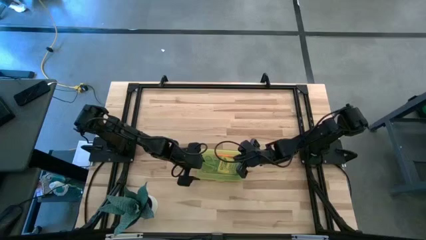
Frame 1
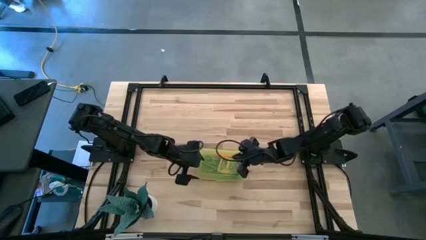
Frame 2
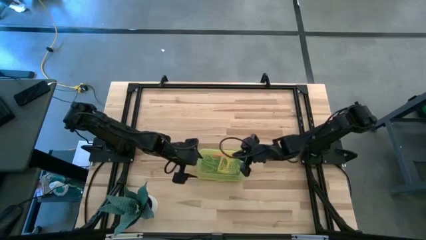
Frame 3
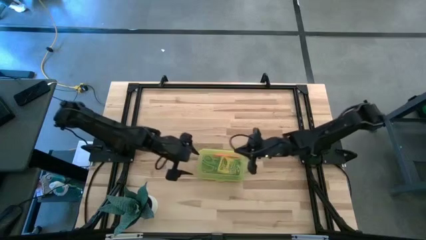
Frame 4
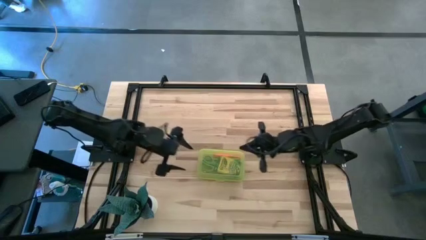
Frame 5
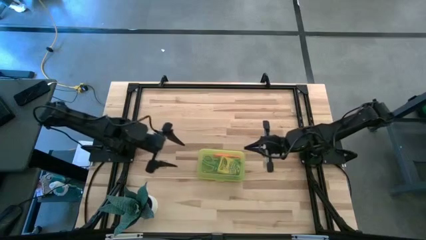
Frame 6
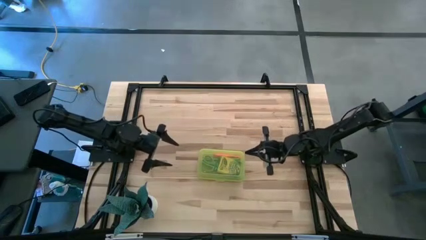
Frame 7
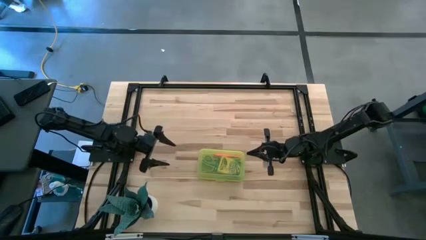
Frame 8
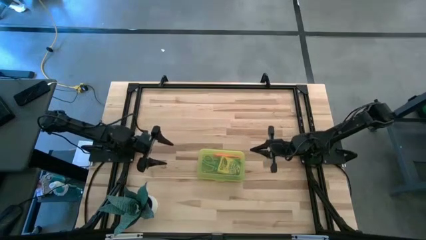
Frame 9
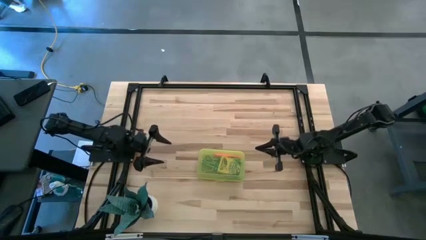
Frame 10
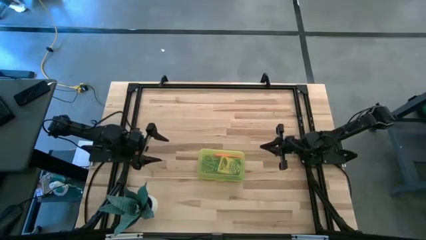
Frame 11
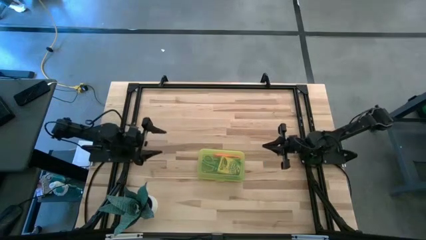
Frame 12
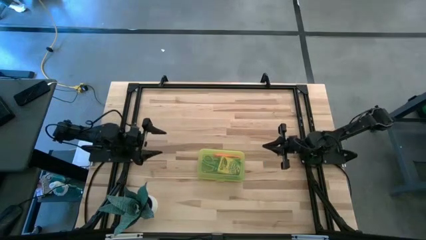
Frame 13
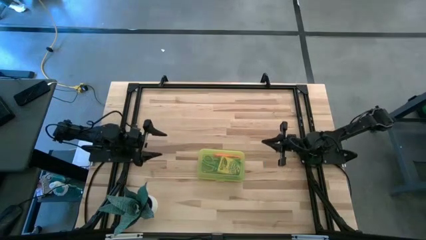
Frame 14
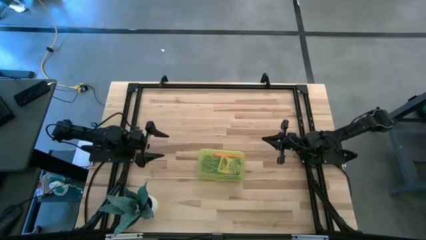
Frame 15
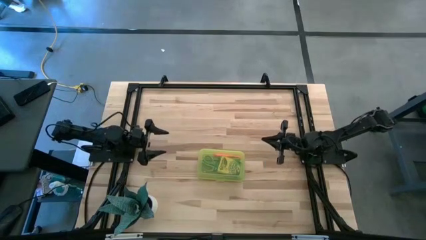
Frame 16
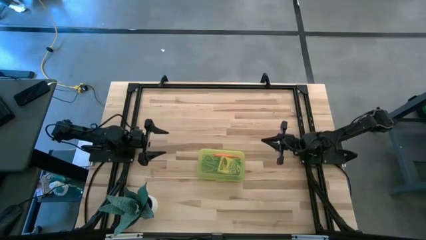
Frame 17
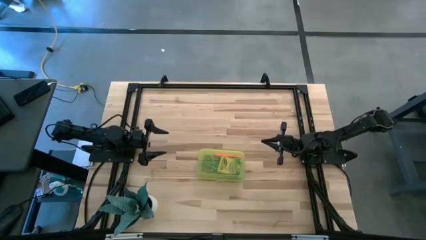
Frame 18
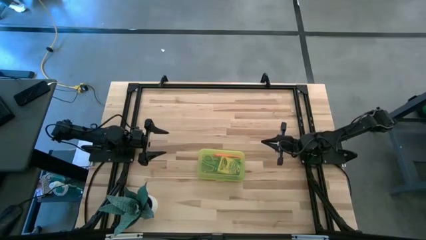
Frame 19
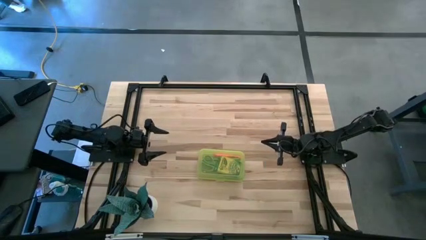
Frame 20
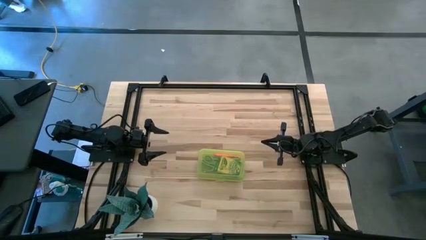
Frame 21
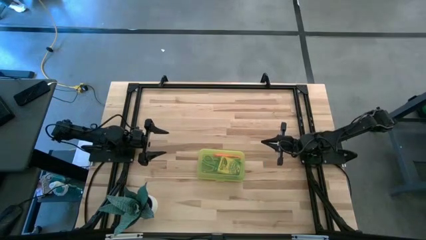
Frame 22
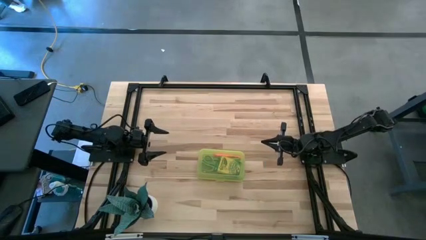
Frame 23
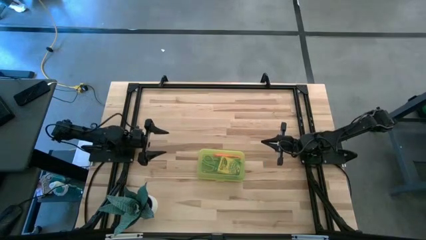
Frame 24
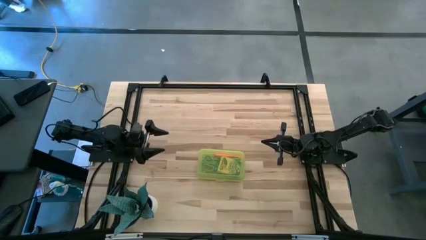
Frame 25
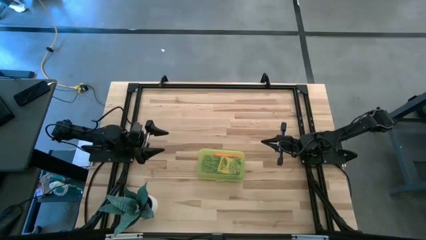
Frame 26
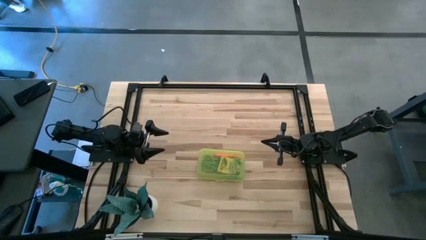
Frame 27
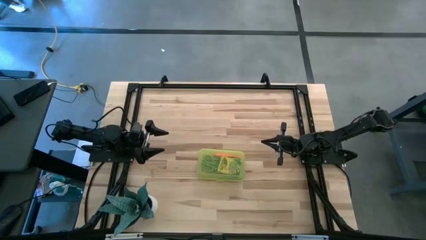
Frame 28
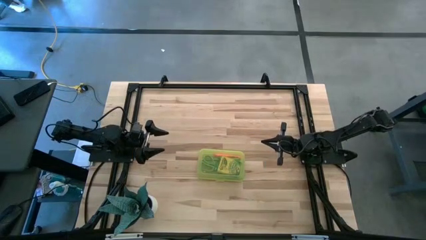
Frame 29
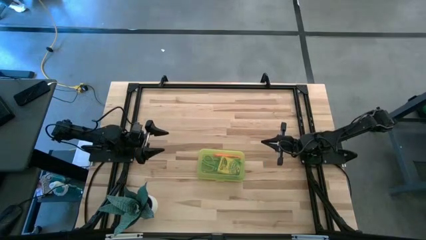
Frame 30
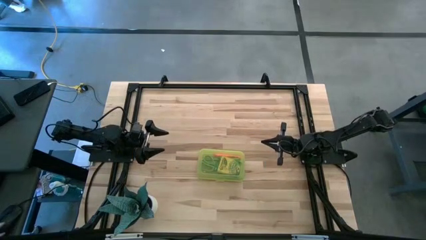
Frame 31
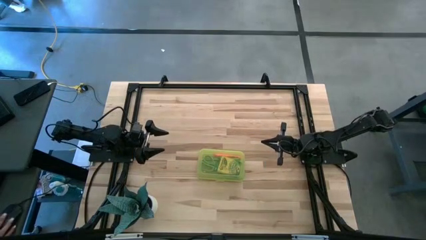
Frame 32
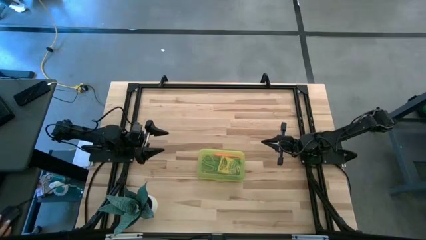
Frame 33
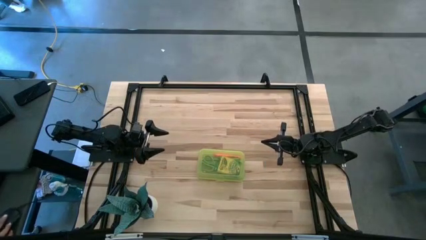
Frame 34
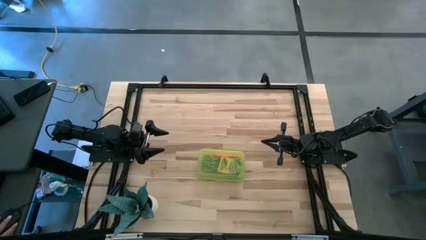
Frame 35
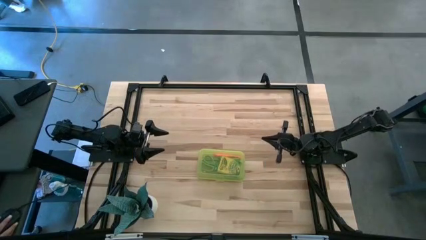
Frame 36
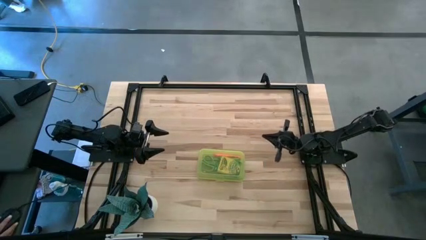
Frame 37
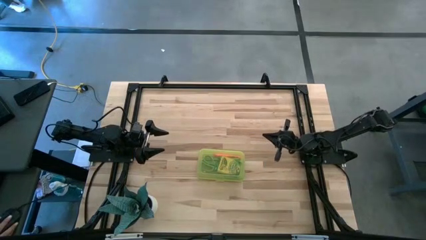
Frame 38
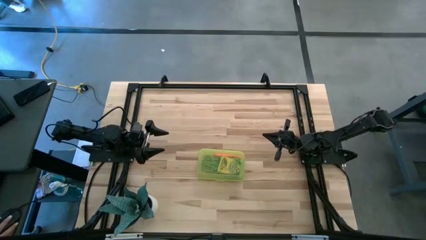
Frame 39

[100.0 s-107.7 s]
Task: Pack school essentials
Return to home position

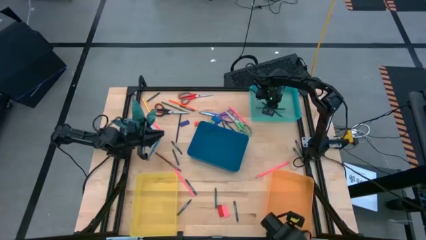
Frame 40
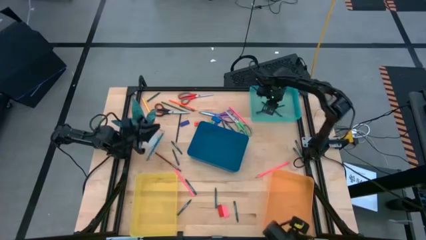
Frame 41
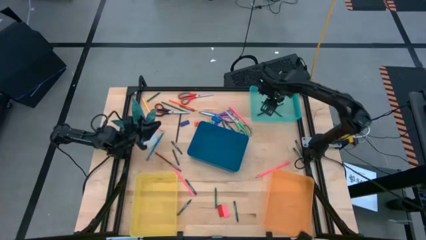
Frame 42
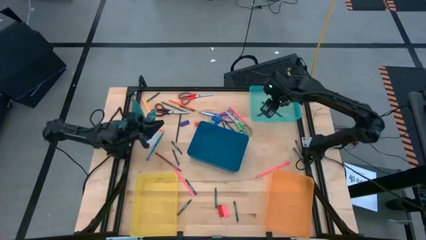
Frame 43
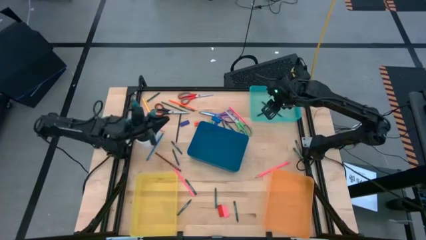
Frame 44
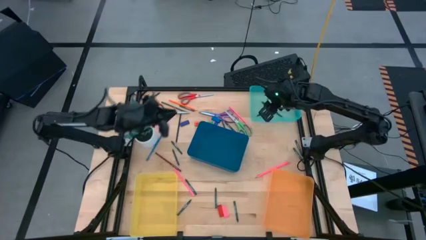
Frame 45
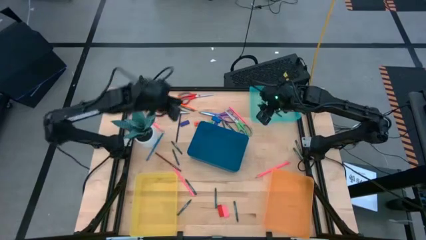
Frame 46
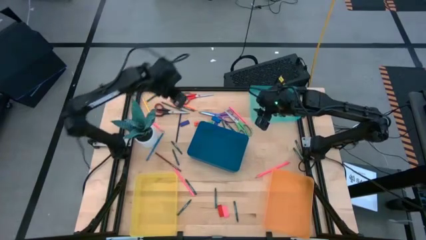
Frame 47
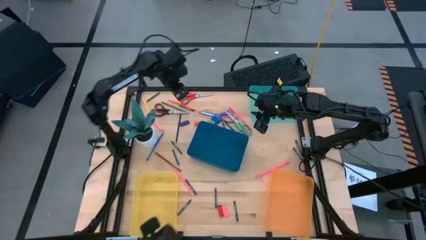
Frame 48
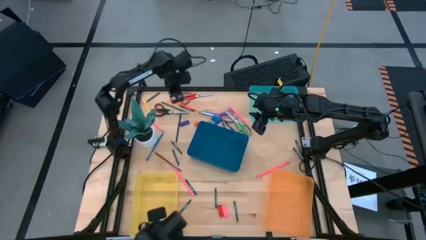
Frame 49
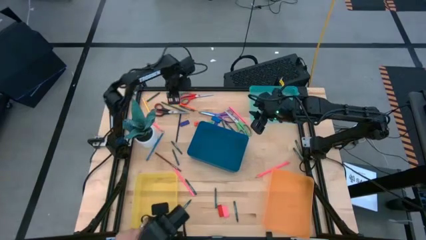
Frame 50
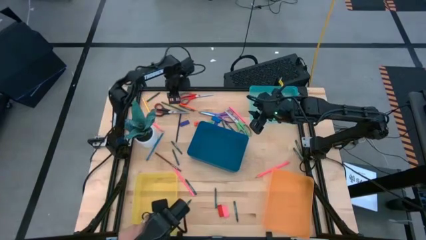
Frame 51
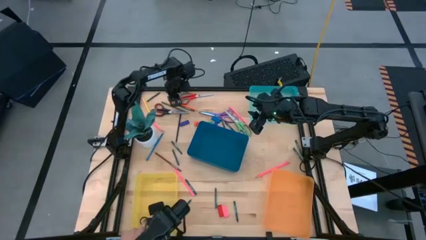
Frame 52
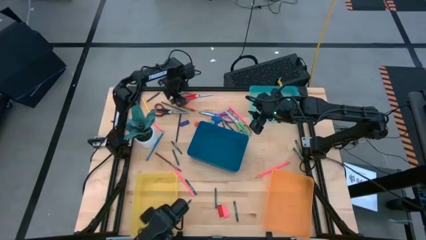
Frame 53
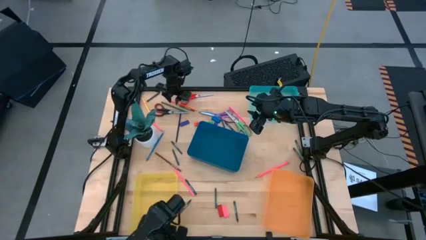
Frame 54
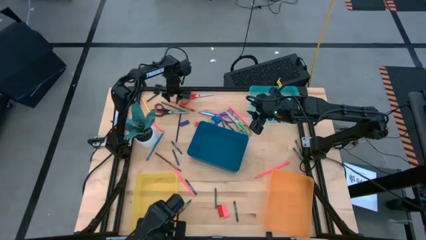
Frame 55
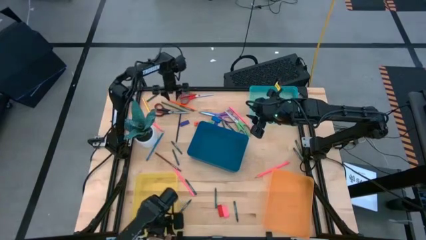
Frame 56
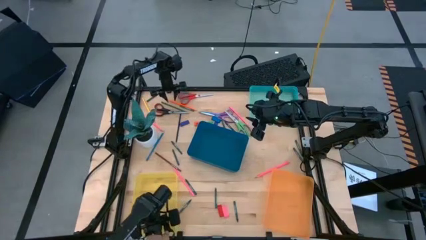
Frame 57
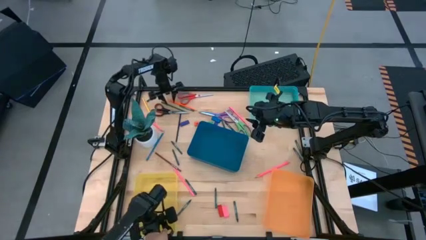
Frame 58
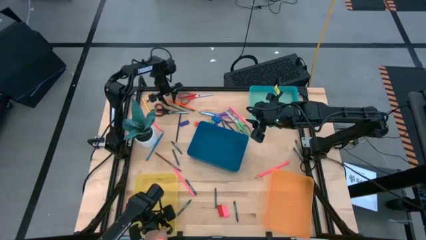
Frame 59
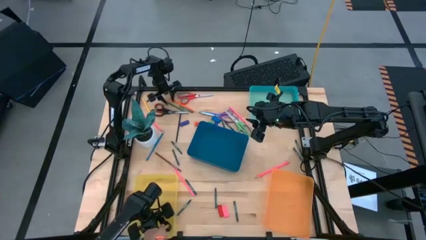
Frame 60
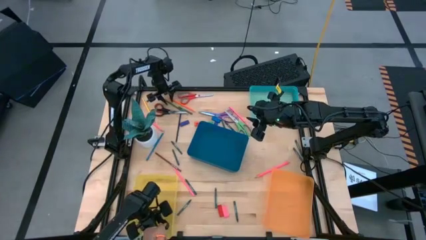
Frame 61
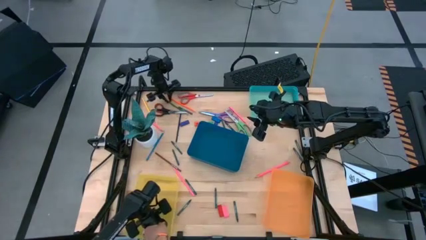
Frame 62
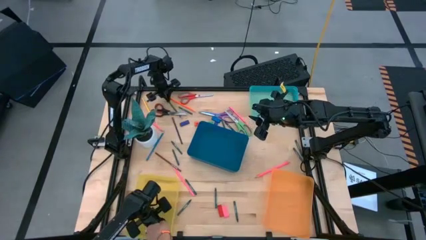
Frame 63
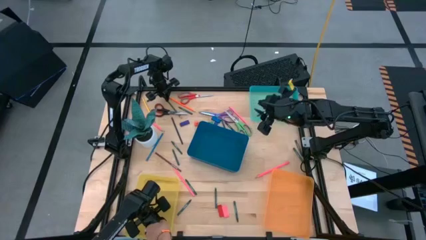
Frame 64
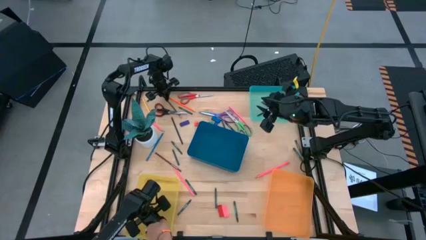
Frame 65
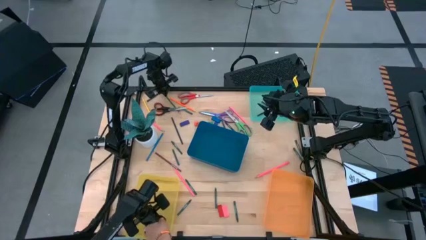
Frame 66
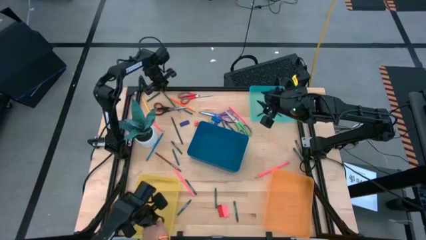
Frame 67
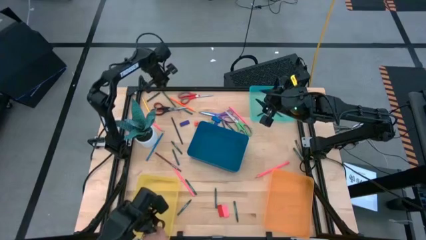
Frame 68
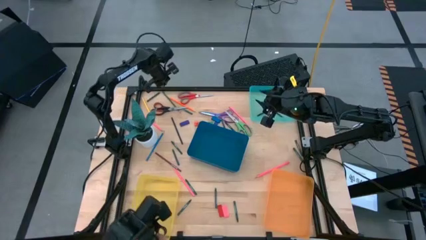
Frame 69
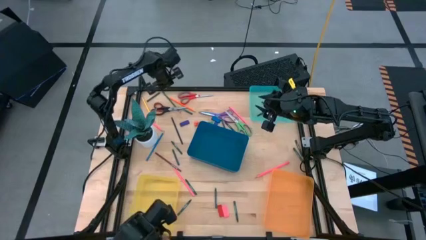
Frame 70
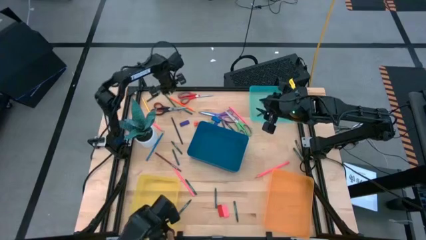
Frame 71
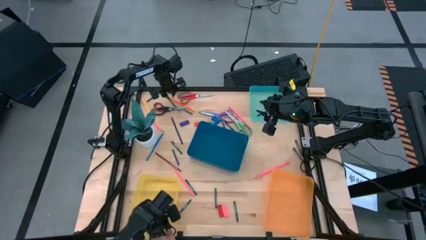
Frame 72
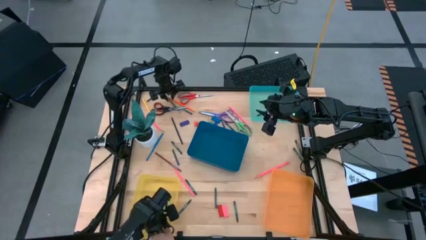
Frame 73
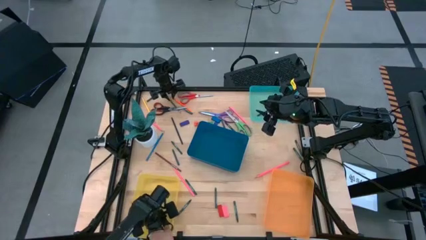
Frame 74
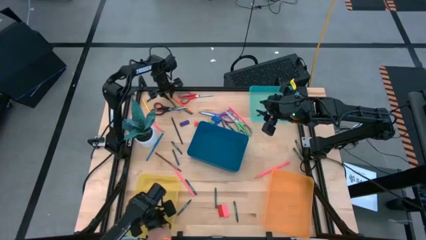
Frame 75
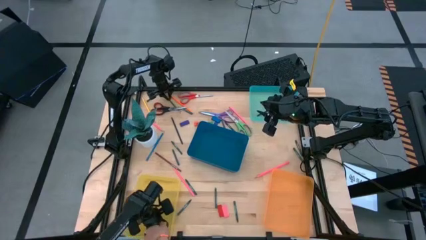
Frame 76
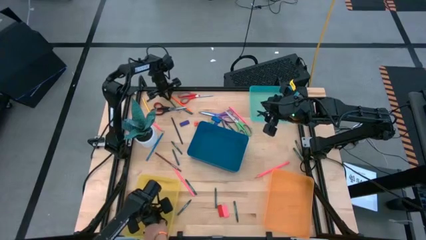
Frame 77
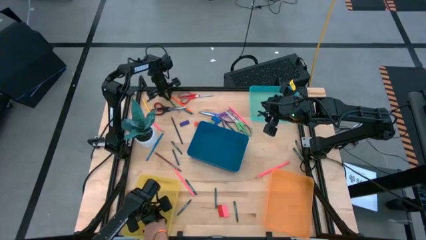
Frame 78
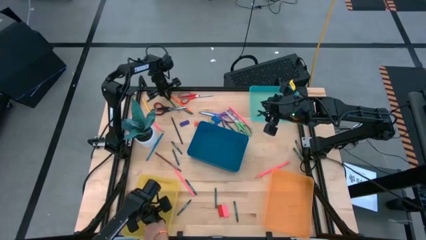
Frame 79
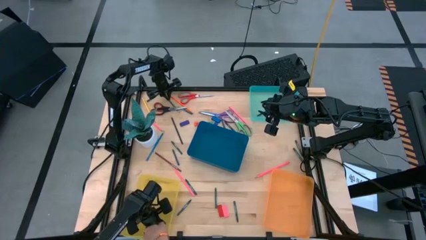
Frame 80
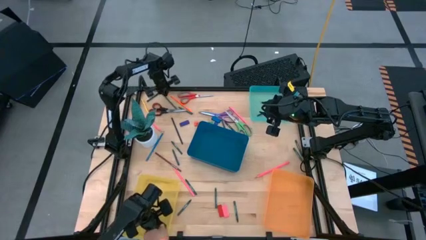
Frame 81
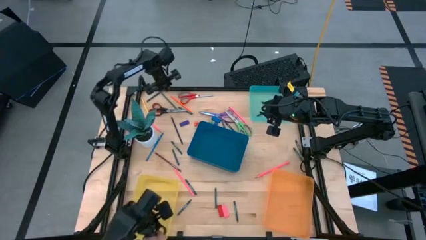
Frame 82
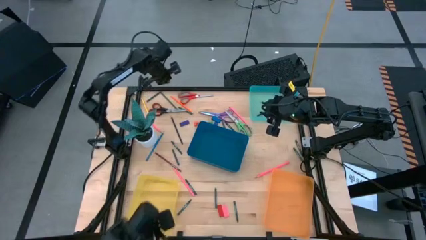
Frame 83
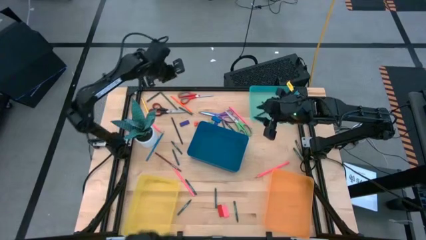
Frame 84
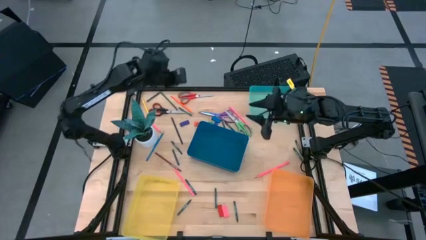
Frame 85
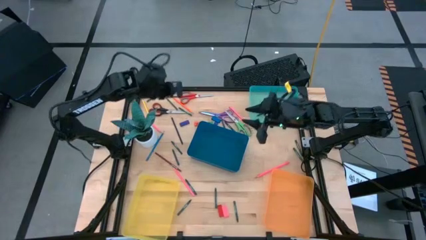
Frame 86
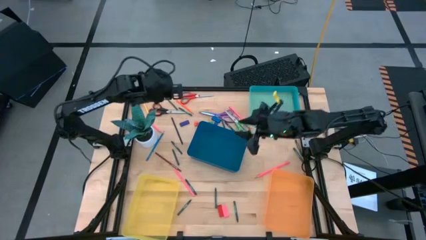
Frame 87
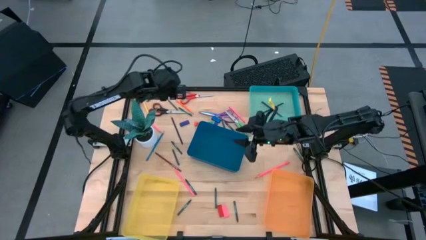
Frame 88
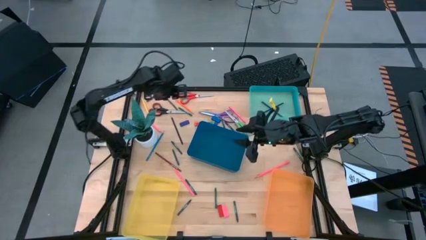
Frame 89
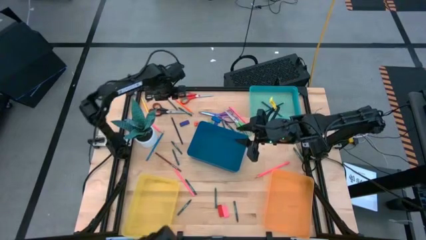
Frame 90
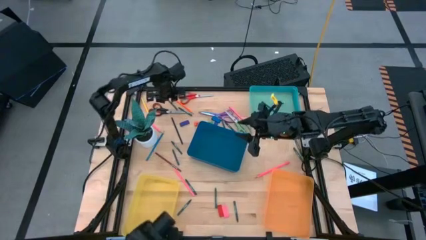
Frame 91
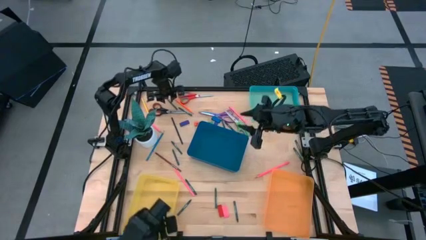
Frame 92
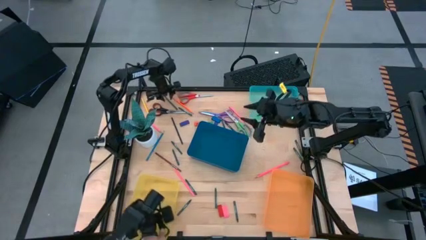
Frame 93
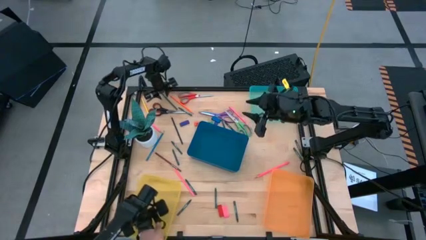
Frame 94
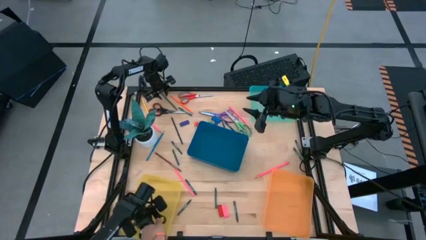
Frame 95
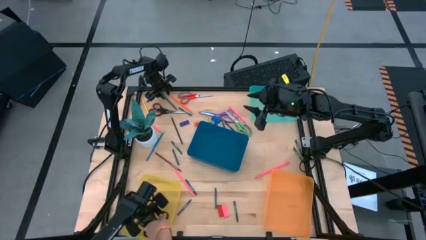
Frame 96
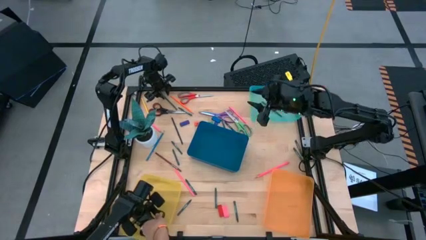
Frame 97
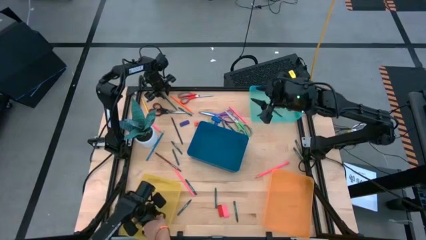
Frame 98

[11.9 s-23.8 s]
Task: Sort crayons/erasers/pens/pencils in bins
Put the green pencil into the green bin
